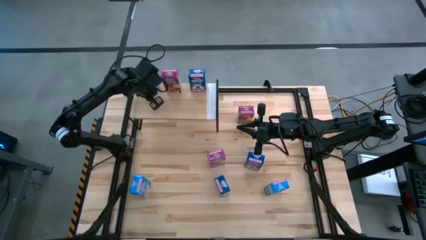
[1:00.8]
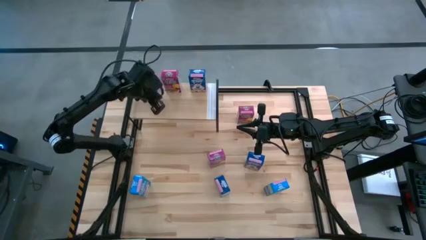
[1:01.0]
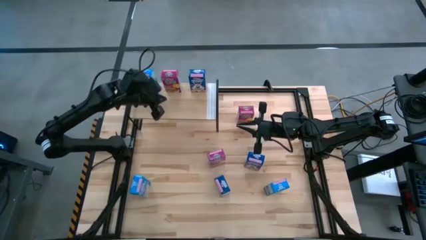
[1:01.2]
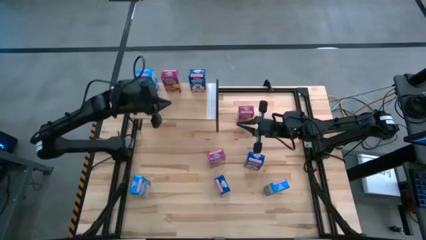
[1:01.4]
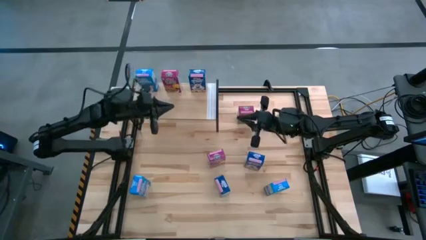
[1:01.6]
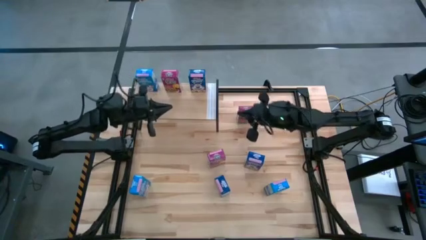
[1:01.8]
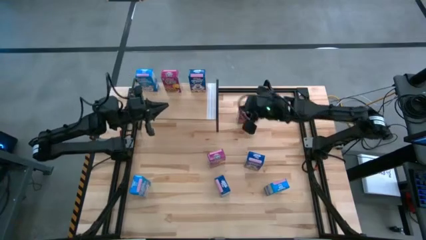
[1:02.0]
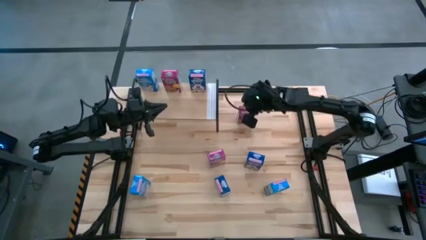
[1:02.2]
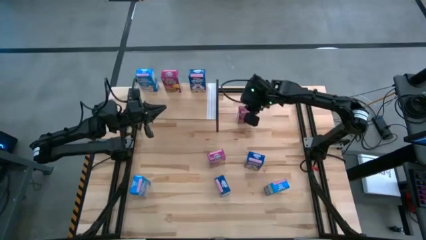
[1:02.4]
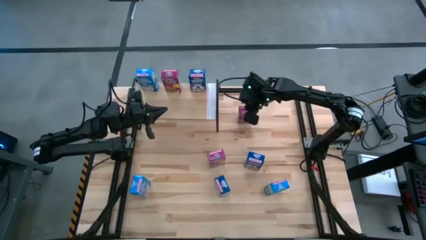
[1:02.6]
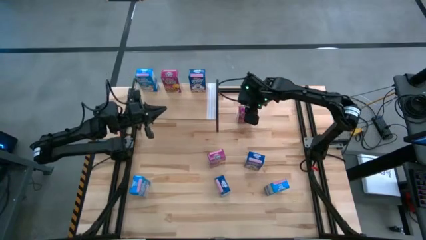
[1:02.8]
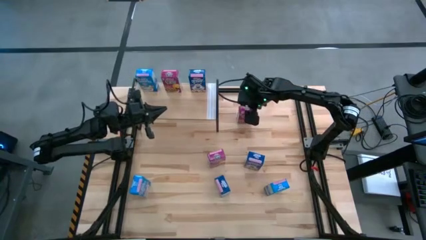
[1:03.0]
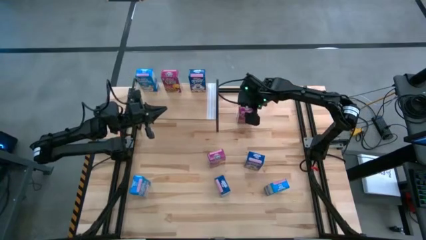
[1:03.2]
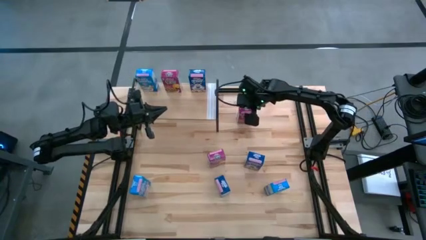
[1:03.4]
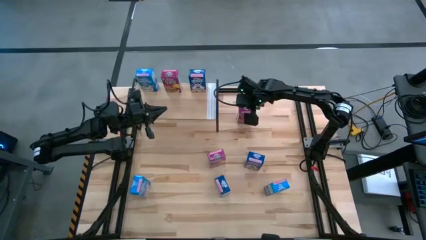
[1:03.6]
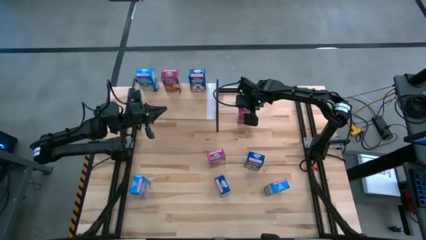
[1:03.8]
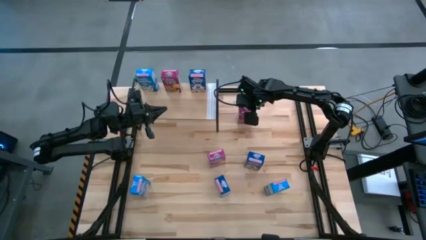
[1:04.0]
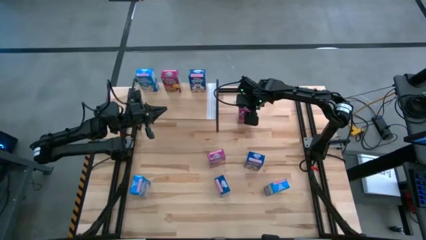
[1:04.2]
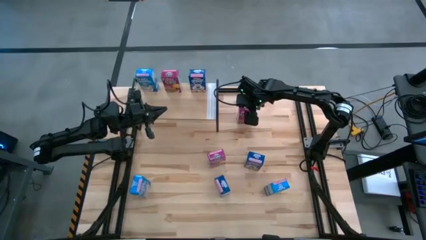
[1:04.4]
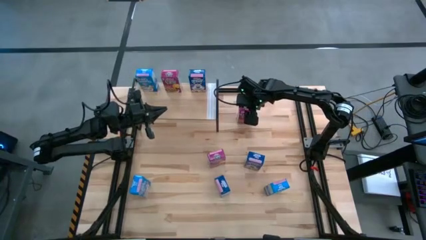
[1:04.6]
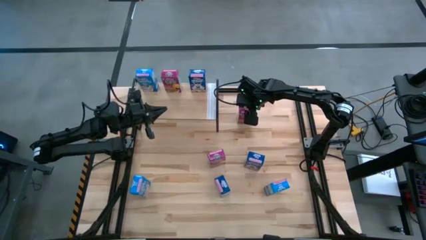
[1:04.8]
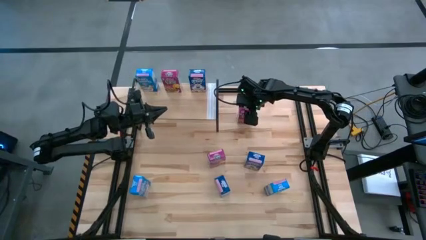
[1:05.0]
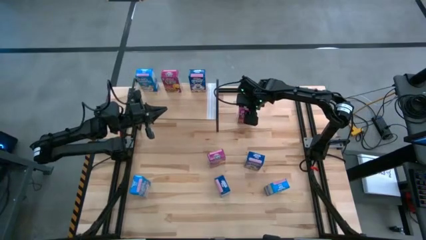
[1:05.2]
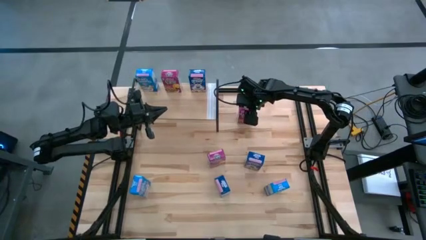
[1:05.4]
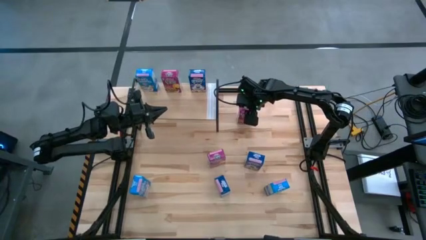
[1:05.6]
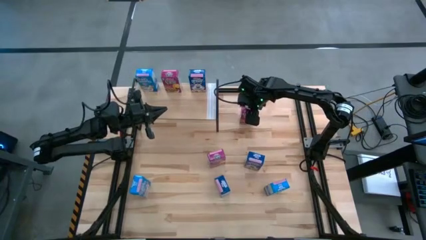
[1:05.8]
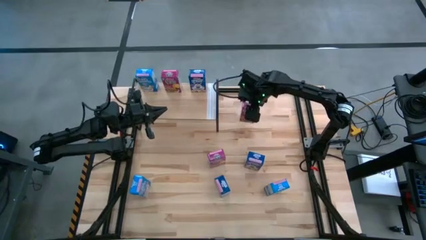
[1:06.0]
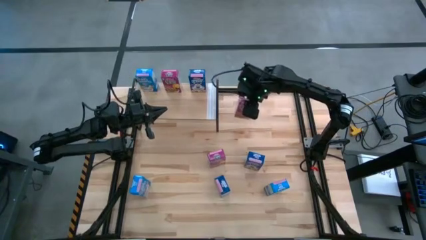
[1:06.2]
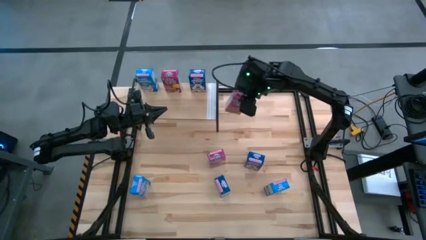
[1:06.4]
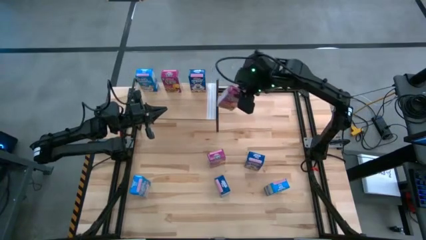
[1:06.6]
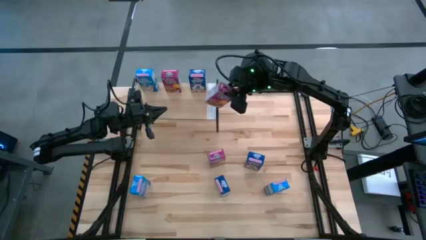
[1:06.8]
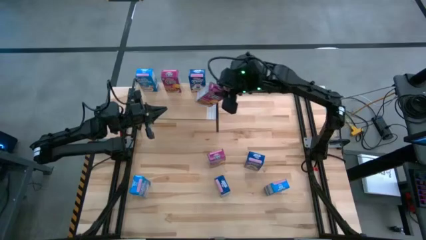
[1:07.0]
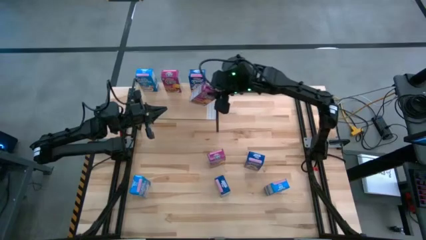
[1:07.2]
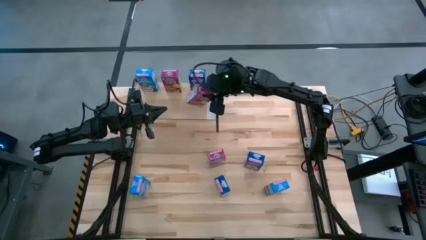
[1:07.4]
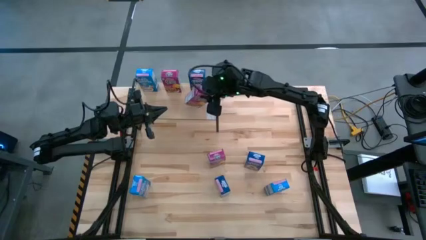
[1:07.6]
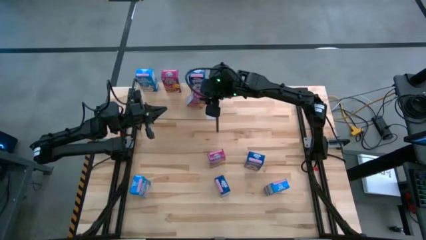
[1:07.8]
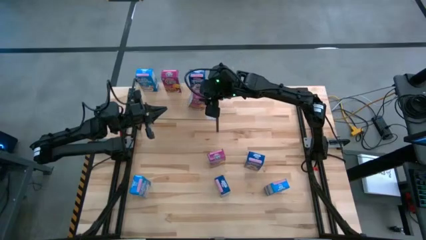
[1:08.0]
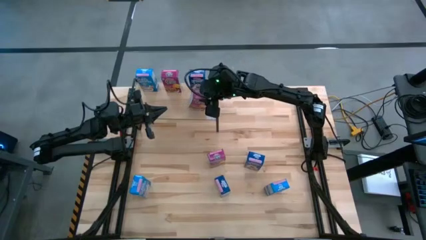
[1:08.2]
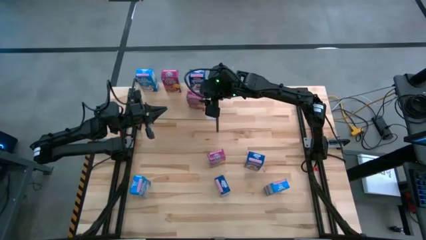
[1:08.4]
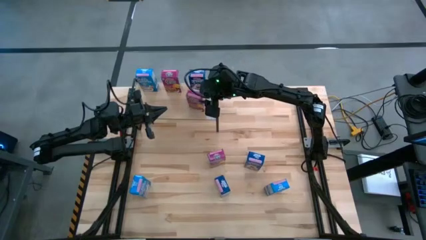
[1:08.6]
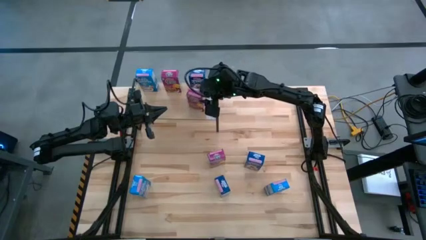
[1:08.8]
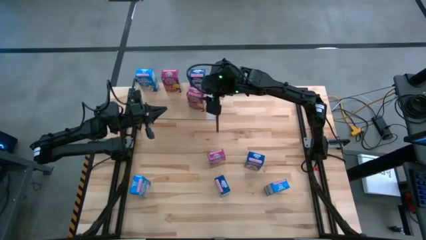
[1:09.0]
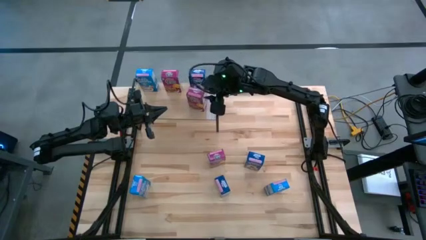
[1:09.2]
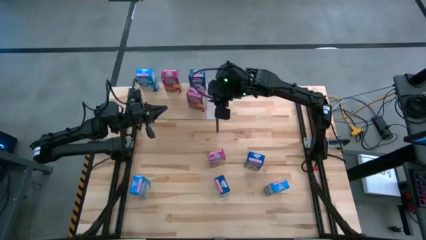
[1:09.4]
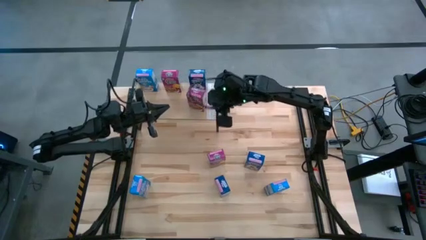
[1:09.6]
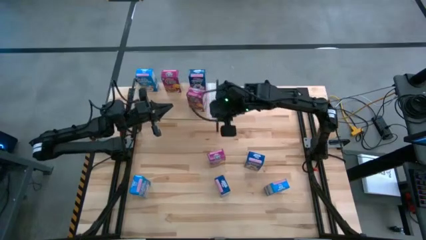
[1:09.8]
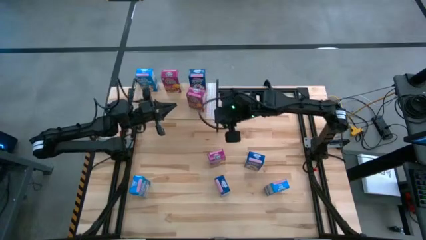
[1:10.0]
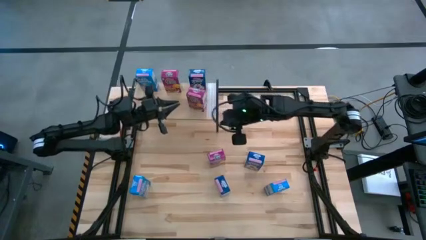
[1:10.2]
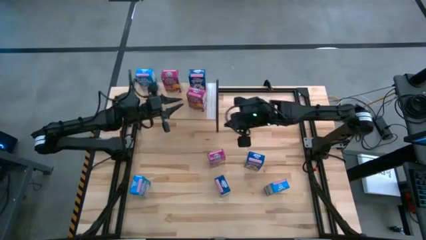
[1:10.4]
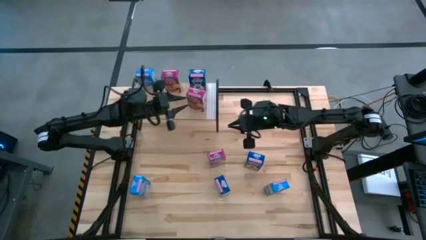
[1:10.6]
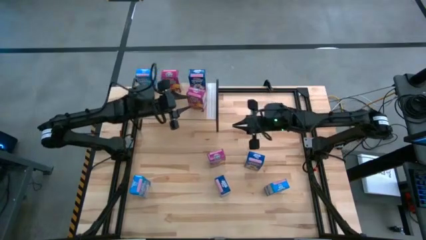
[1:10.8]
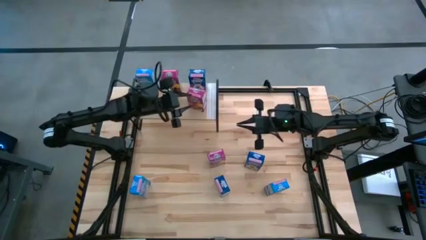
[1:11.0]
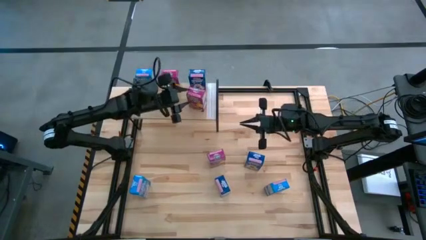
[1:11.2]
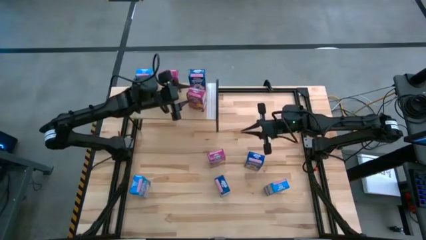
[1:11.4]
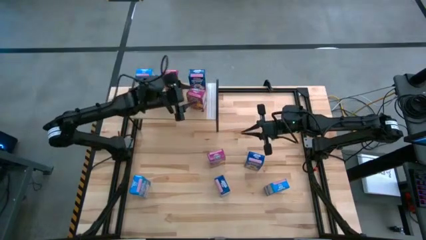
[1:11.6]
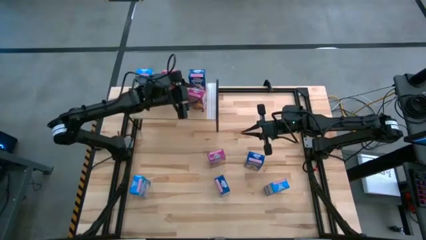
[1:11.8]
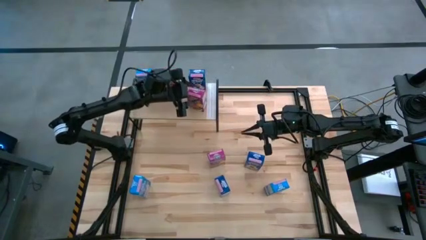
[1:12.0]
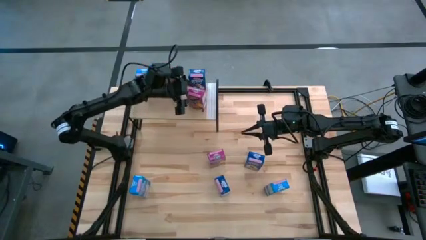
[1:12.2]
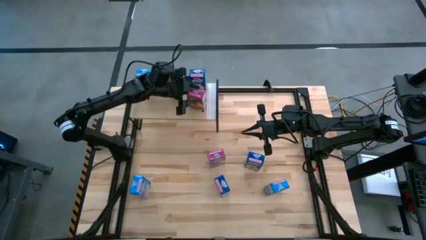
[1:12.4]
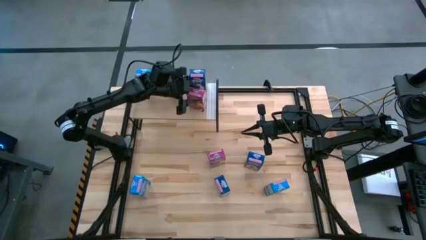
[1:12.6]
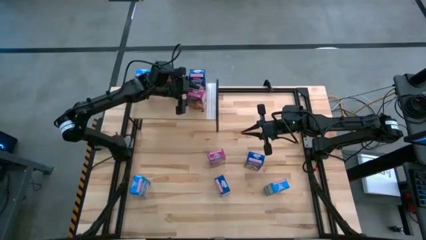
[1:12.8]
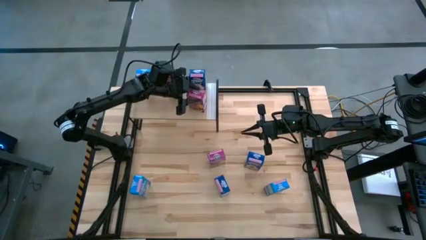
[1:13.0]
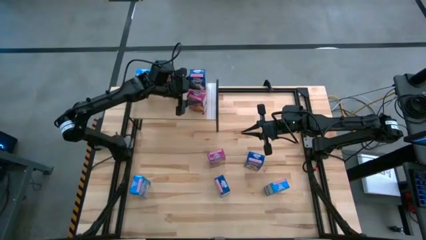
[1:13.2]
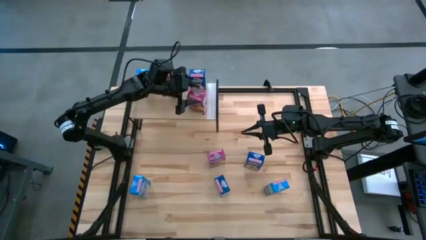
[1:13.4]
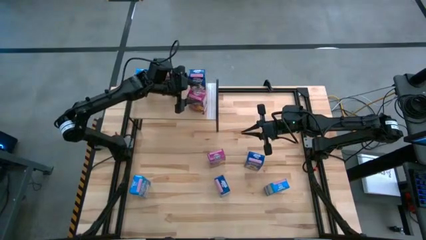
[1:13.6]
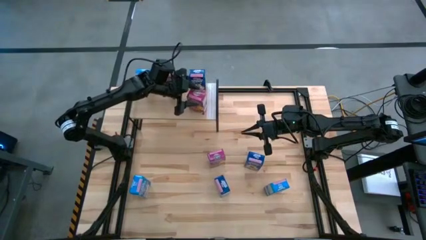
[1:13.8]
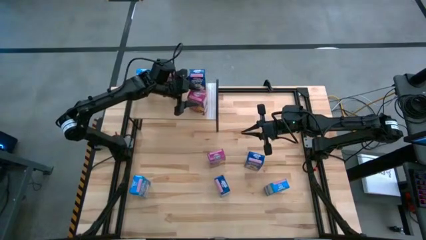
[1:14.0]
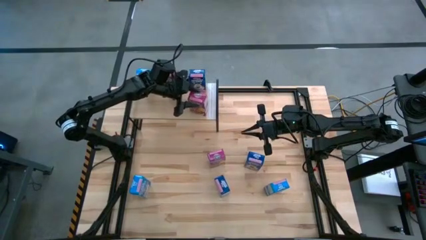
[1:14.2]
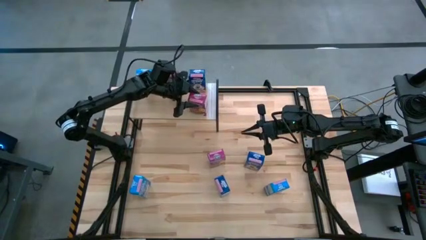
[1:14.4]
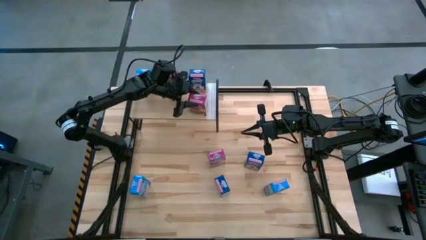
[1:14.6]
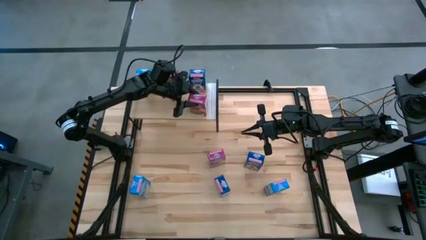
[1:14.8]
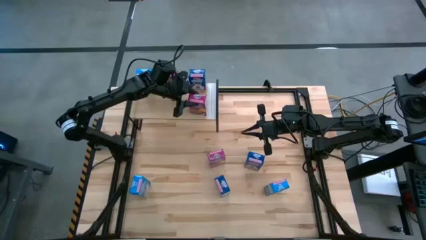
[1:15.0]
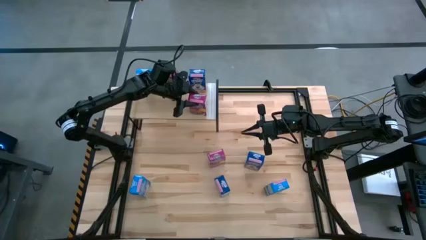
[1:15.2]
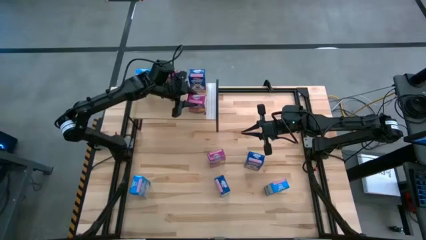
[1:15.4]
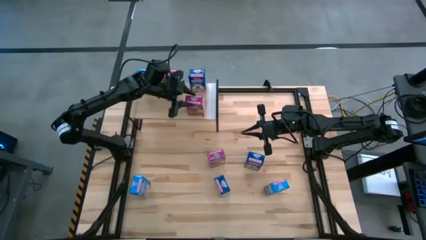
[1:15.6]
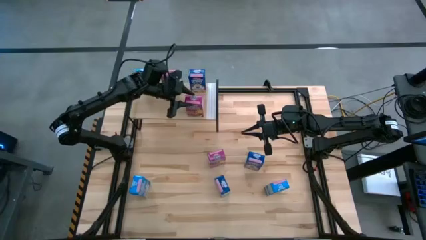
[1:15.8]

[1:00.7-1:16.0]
Task: Stack cereal on shelf
Put the top pink cereal box on the shelf

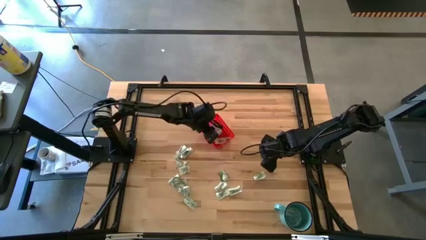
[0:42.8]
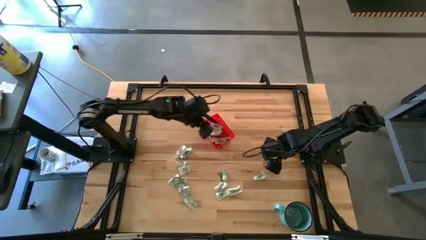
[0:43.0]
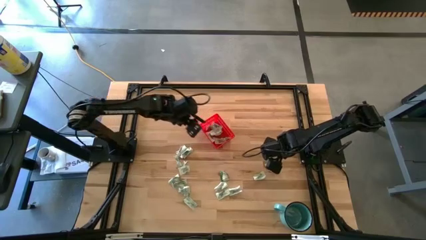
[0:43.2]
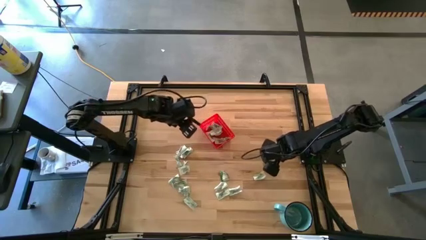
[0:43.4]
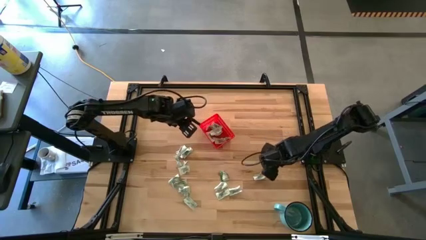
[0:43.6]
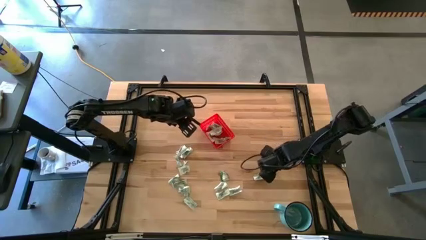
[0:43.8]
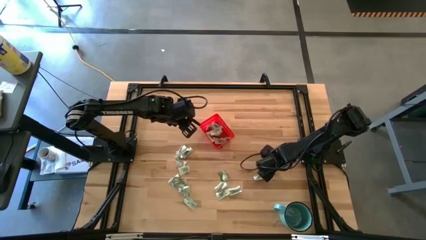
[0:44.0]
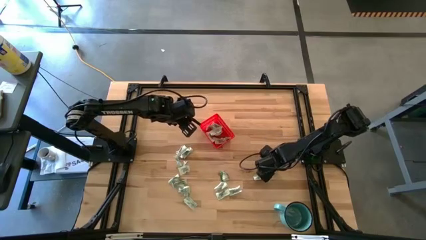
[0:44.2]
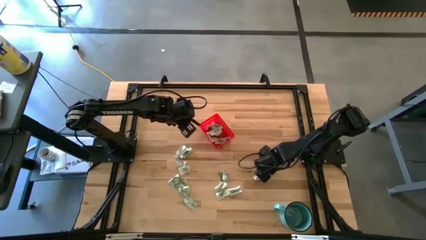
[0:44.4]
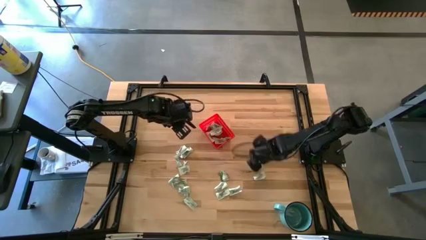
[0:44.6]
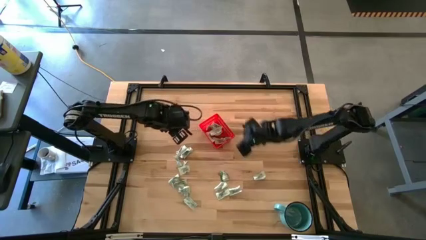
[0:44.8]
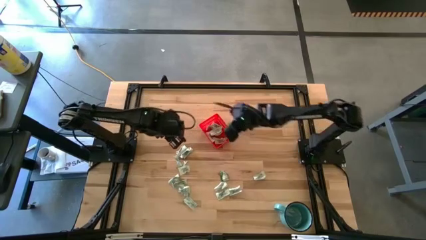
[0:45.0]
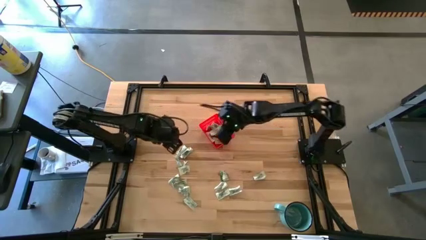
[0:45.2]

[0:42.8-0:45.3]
Task: Pick and place Stevia / Truvia into bins
Put the stevia packet into the red basket
